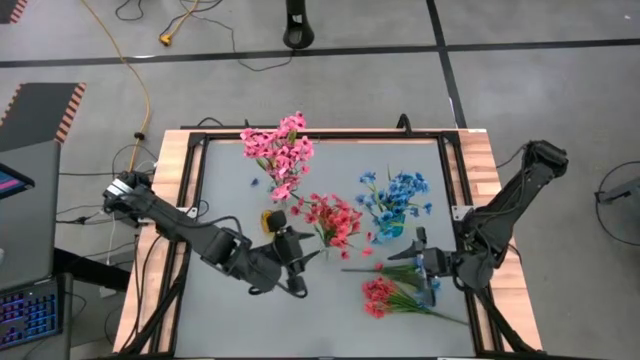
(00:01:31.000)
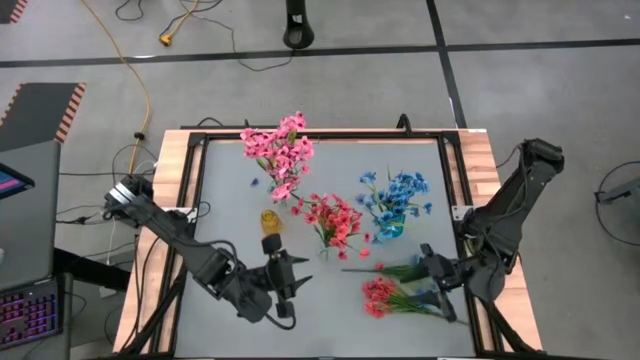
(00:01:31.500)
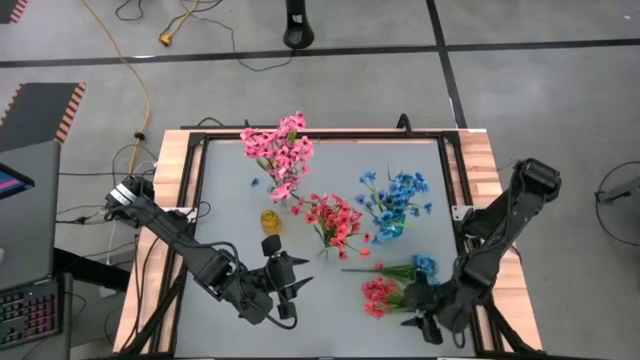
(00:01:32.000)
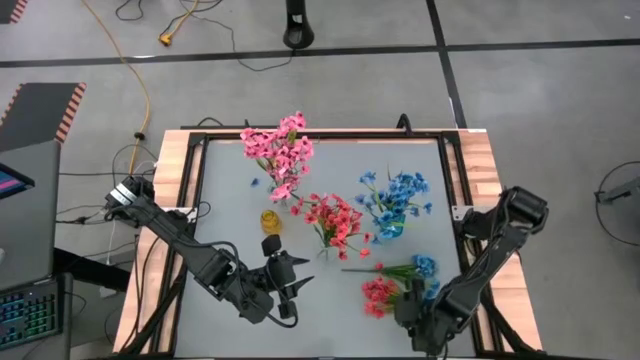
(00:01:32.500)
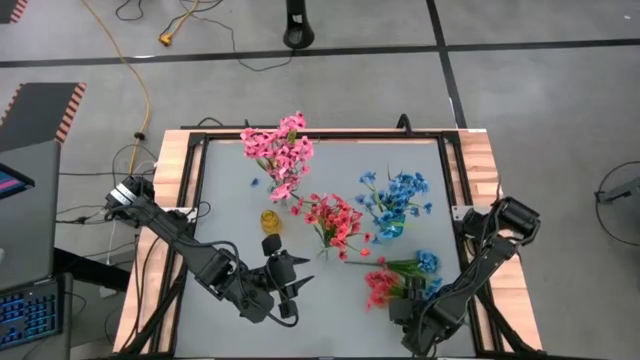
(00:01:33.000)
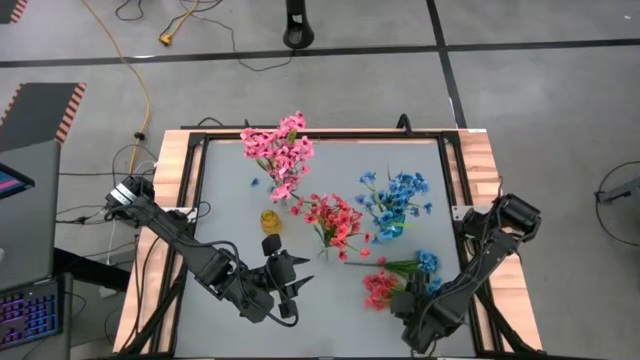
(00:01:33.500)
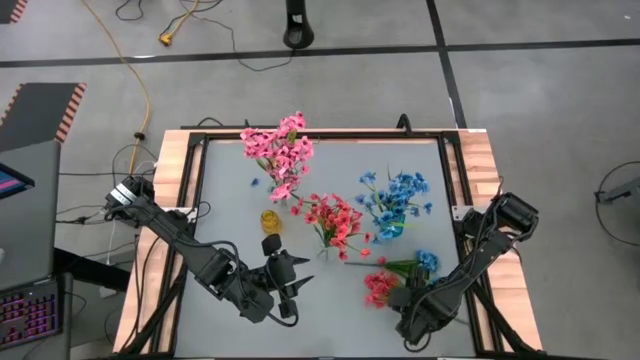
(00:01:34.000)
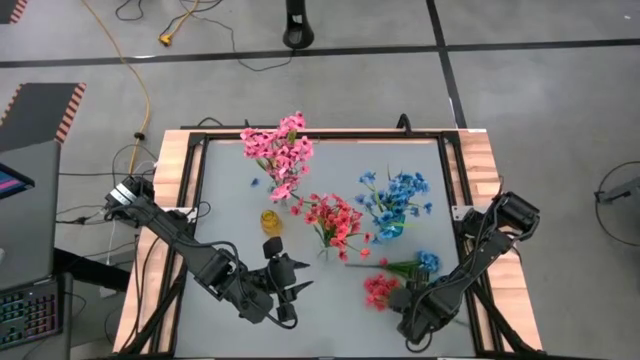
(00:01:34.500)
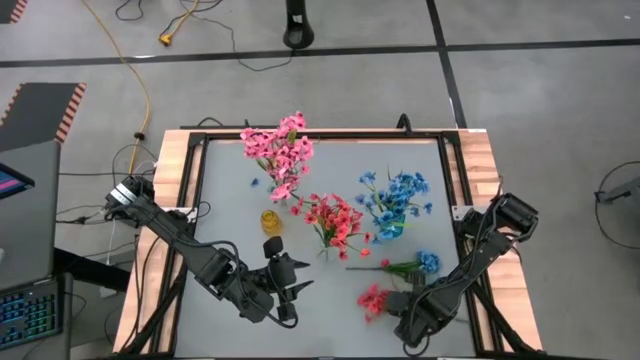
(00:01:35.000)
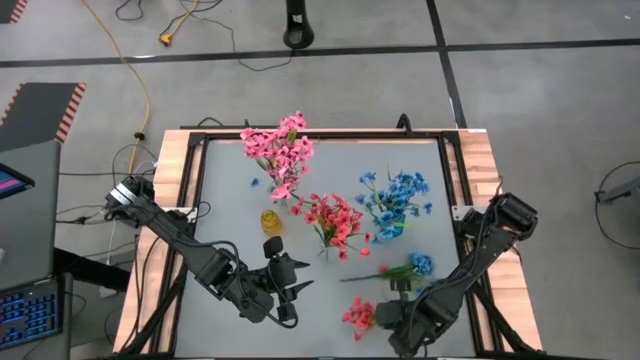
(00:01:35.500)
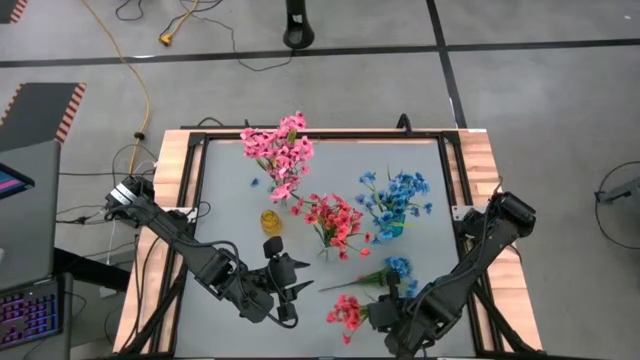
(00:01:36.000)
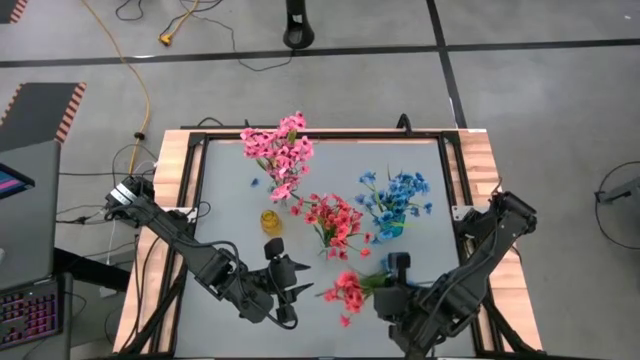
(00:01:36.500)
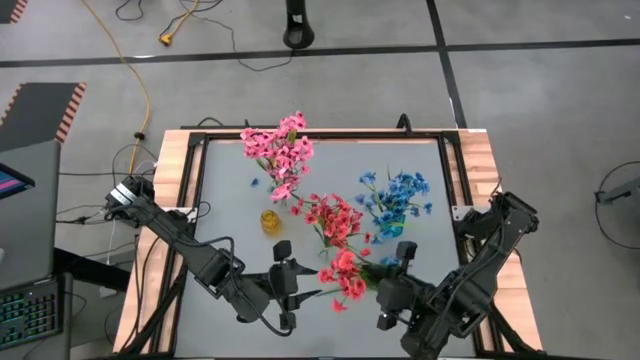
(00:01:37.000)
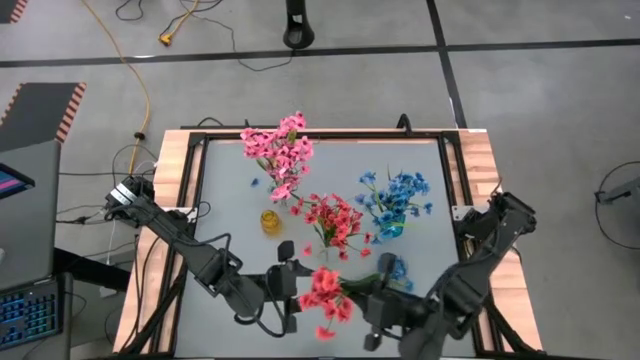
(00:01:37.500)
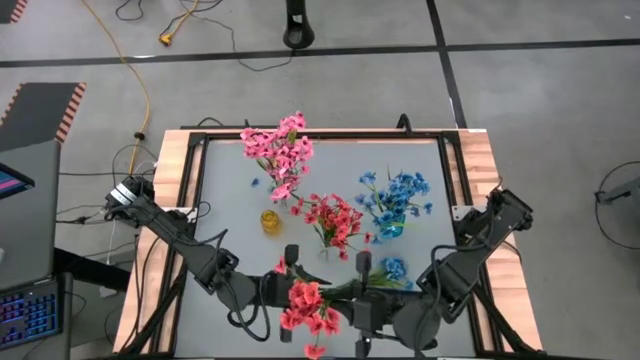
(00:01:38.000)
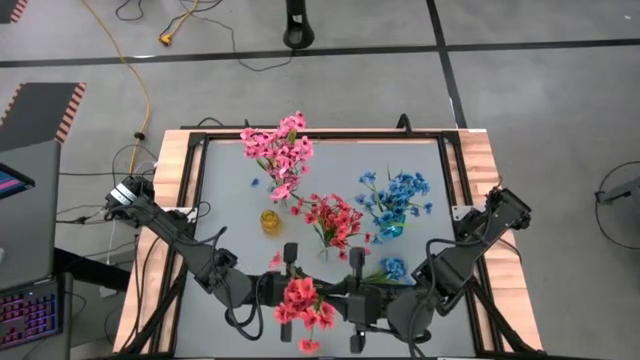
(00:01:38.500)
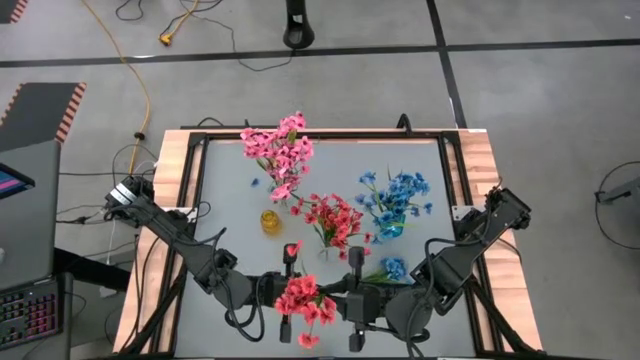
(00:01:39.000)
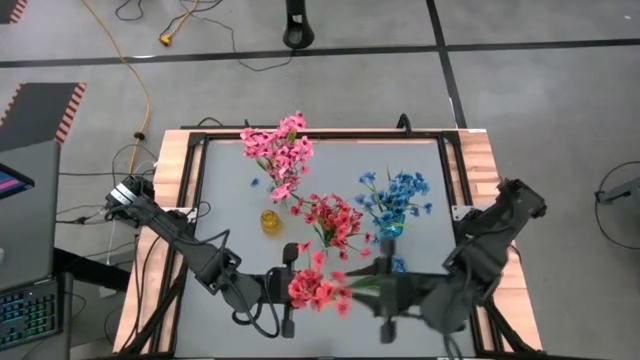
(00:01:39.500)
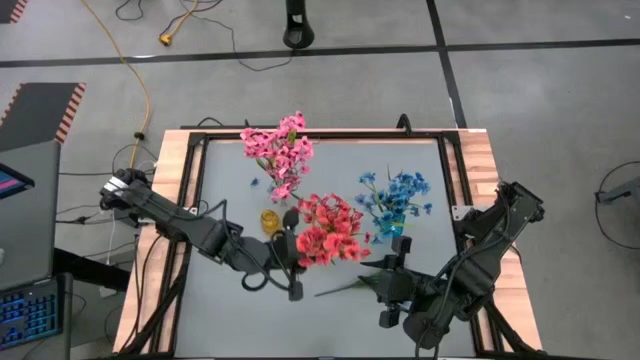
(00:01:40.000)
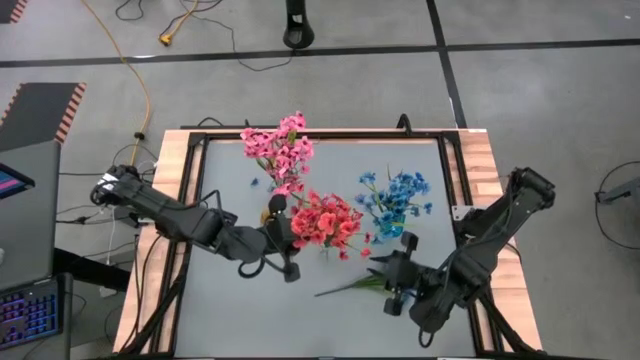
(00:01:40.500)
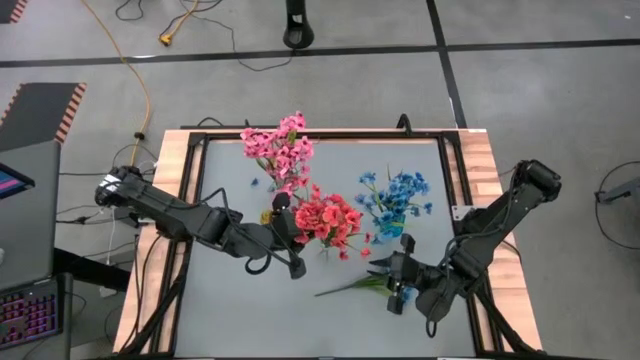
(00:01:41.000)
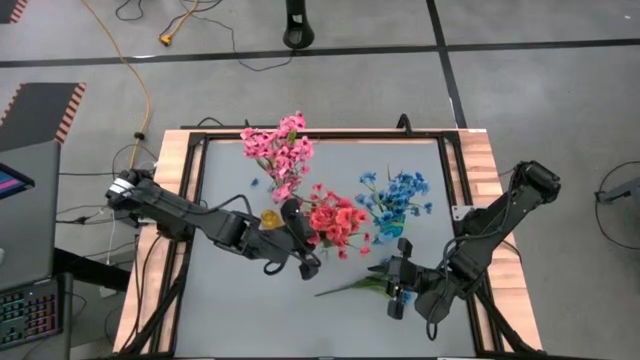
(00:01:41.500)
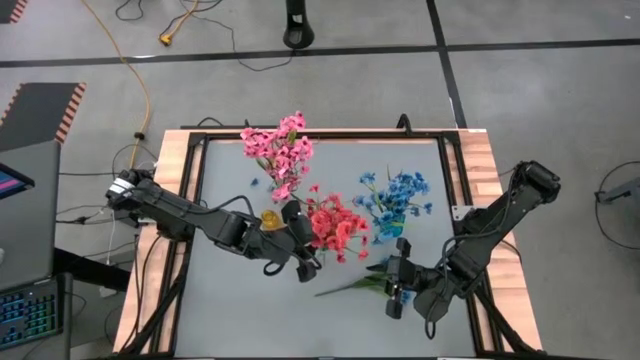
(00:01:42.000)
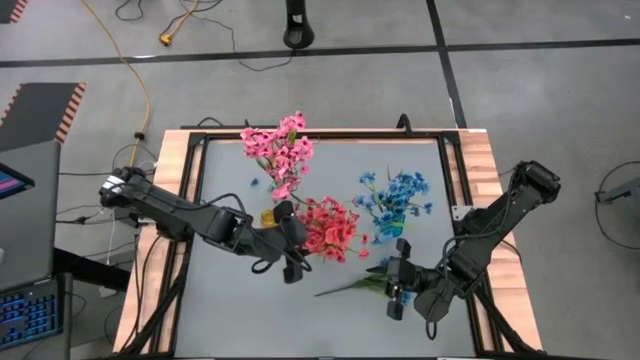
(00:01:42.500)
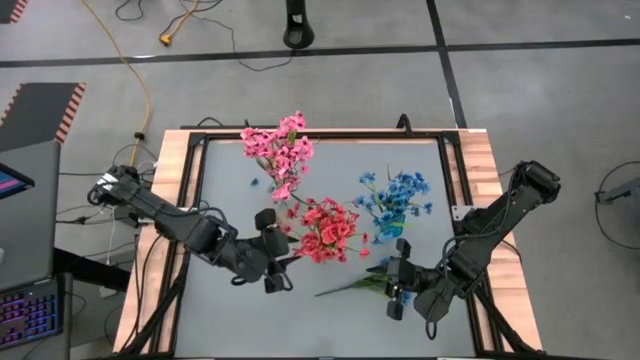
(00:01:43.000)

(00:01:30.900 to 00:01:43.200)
Task: Sort flowers into vase by color
Put the red flowers into the bottom transparent vase

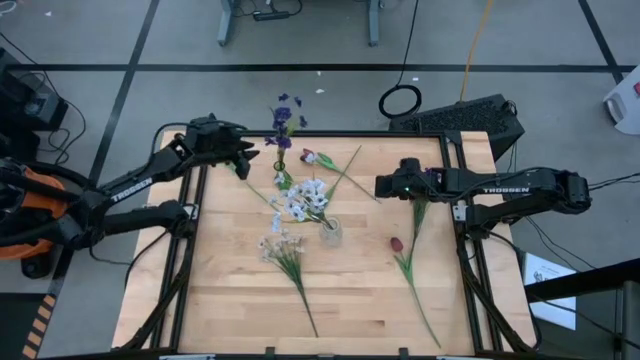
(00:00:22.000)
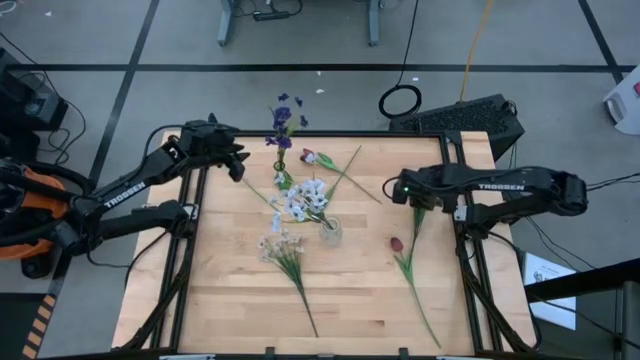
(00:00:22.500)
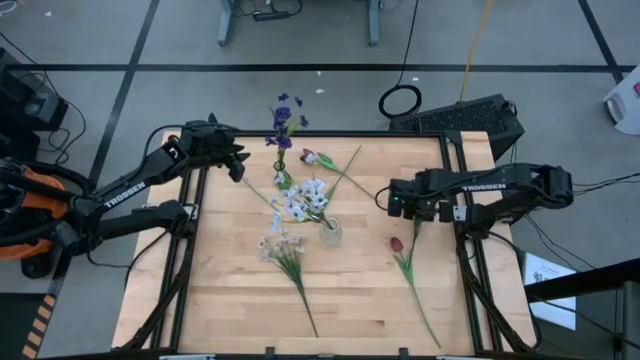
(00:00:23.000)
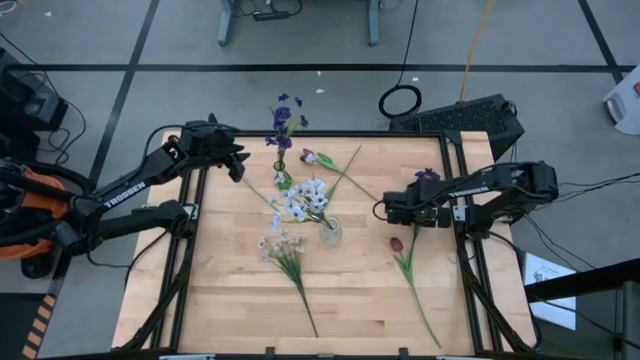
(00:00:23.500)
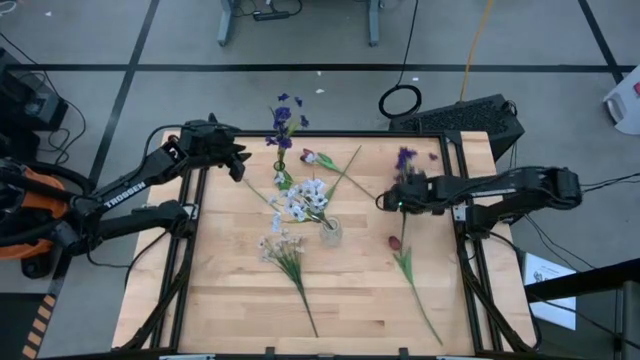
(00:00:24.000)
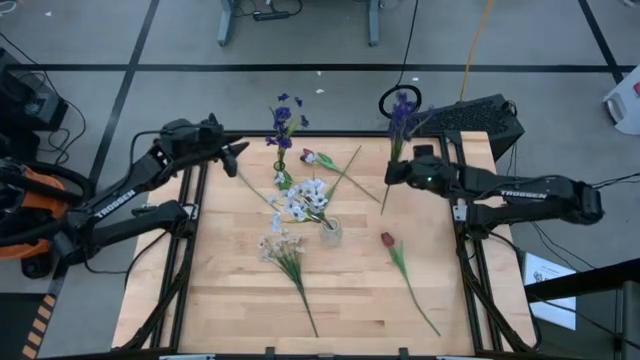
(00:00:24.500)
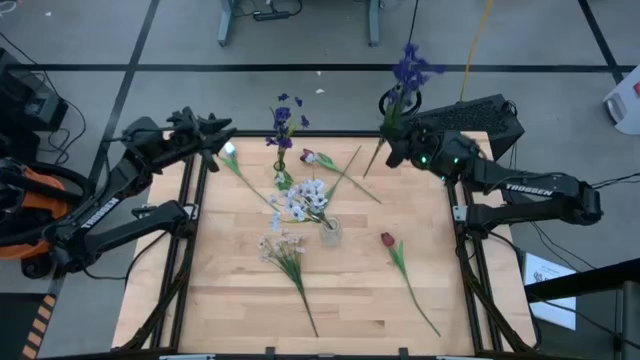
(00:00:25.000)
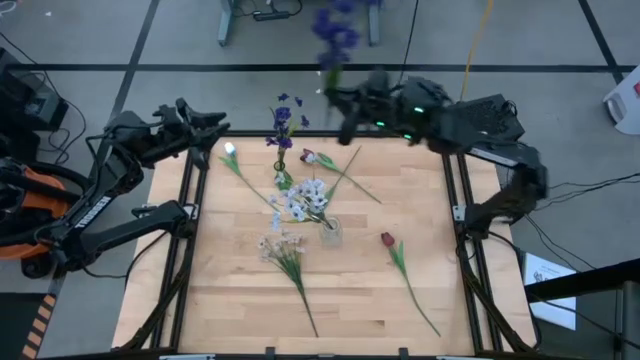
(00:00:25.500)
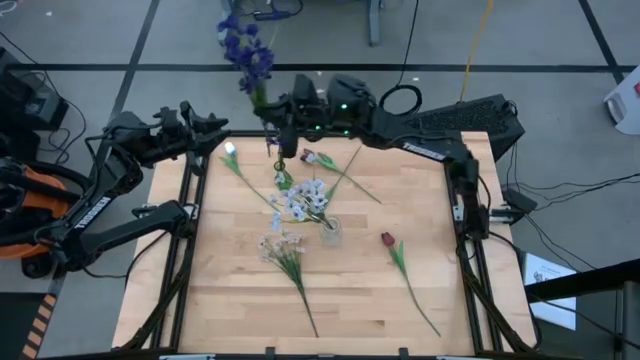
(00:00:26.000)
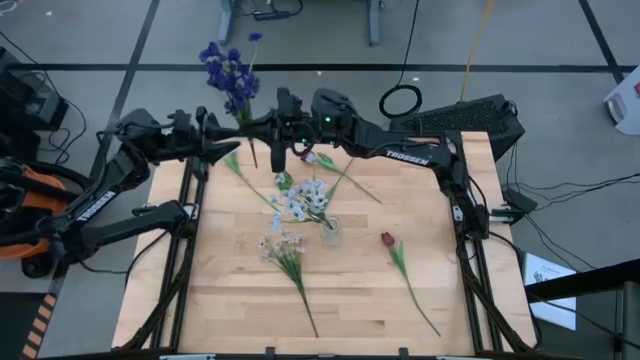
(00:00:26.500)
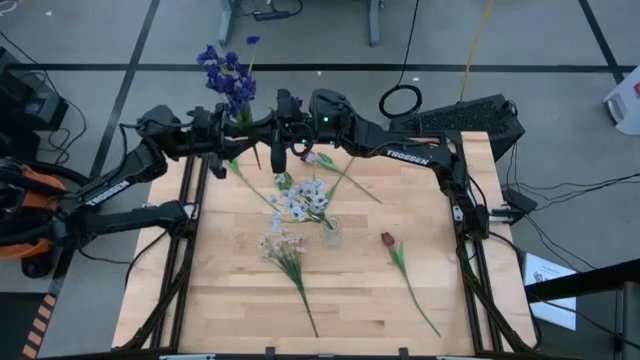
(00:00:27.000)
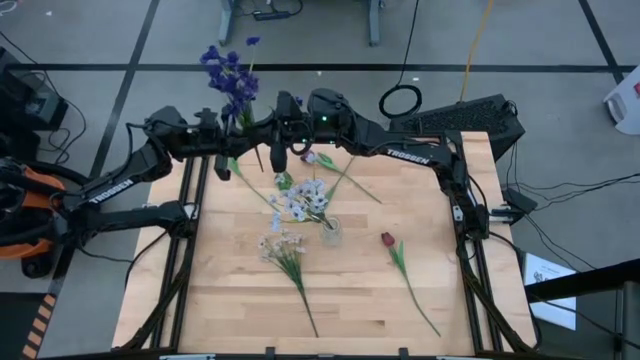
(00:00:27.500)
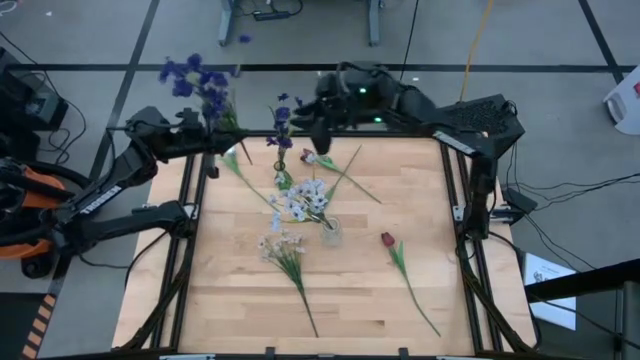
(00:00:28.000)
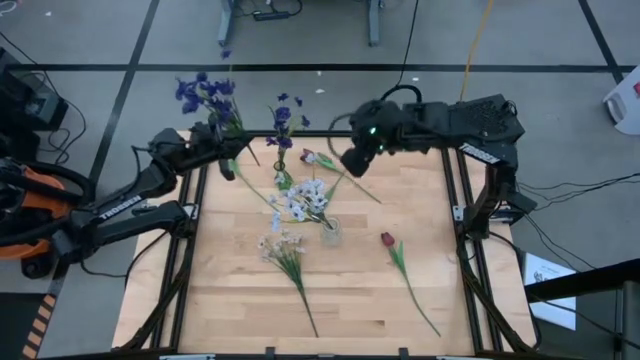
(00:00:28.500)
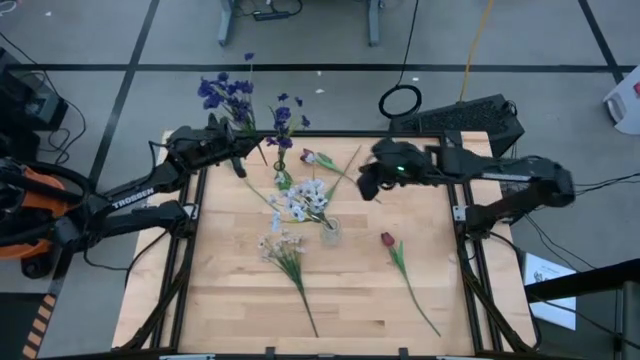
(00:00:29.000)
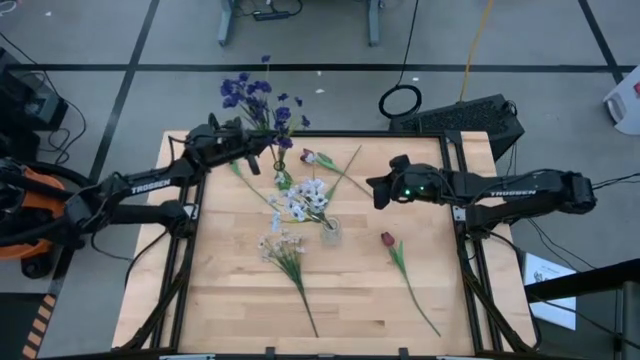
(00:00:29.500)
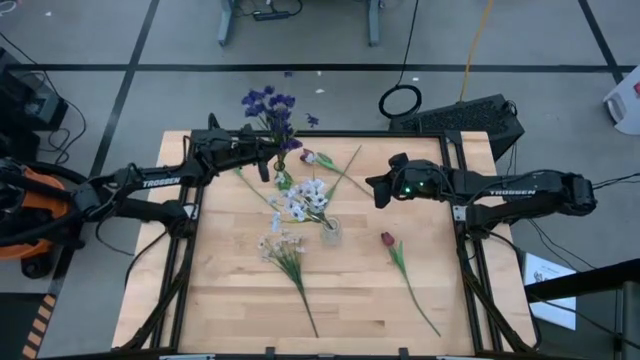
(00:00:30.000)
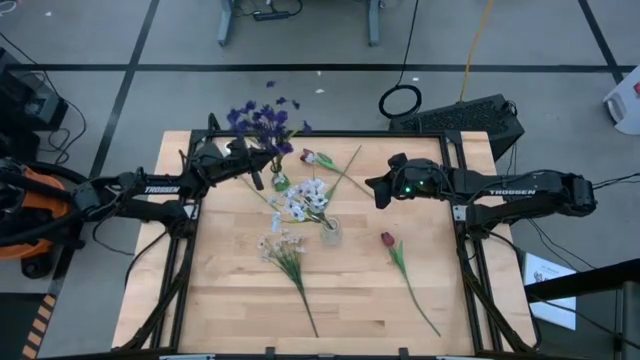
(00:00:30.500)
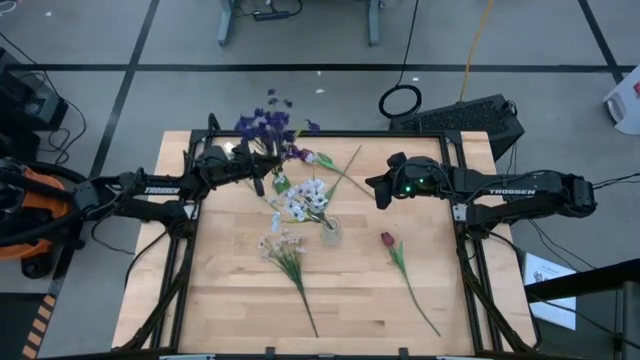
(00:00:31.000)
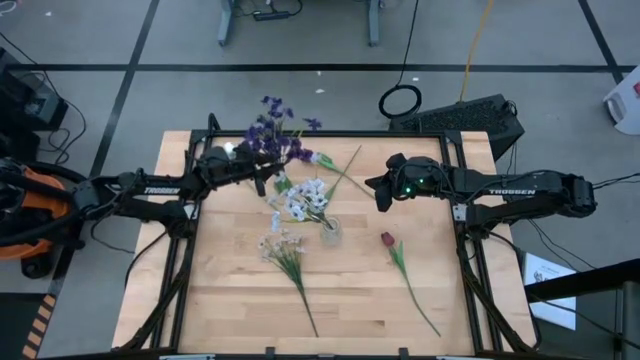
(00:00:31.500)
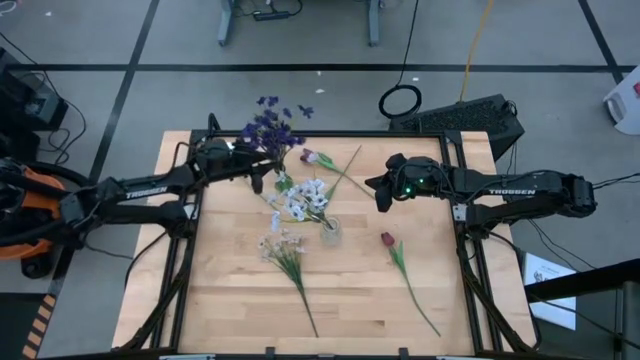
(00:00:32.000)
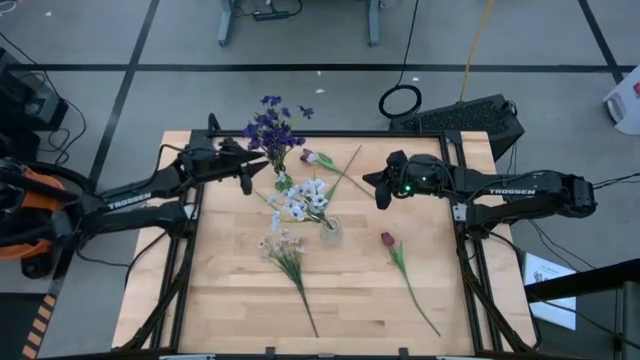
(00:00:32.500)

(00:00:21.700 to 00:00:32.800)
Task: Sort flowers into vase by color
Put the violet flowers into the green vase
